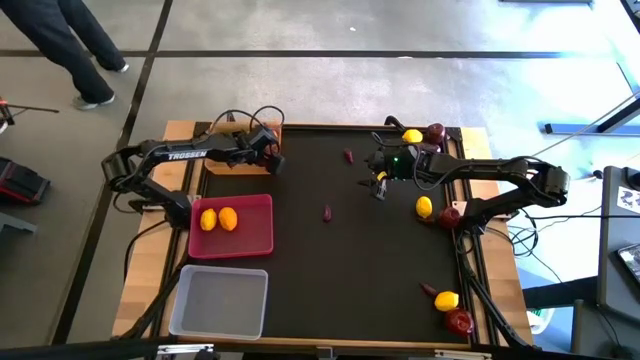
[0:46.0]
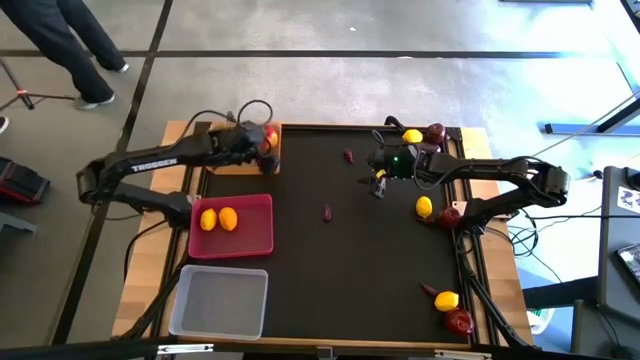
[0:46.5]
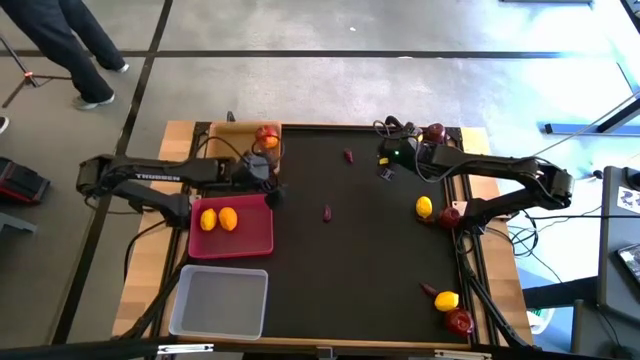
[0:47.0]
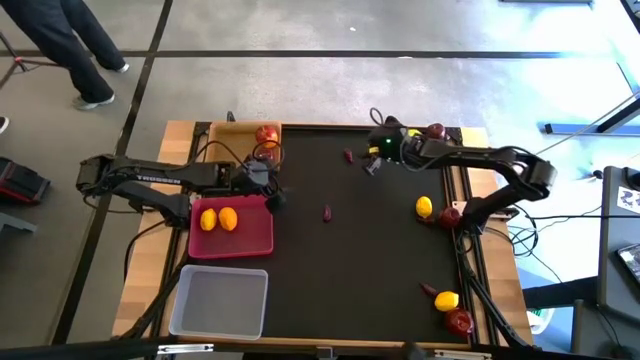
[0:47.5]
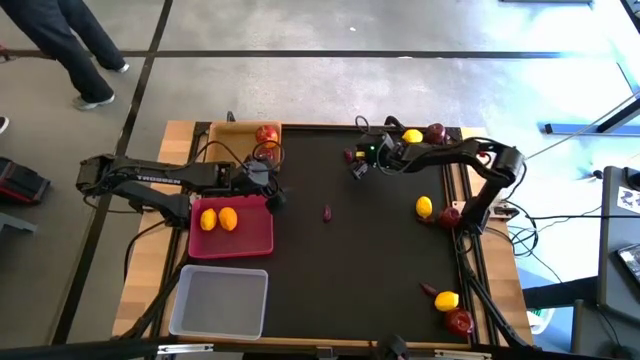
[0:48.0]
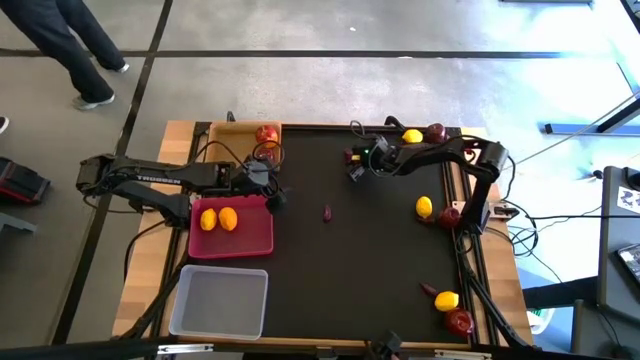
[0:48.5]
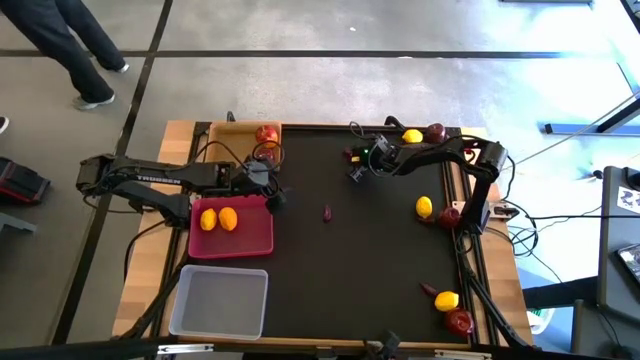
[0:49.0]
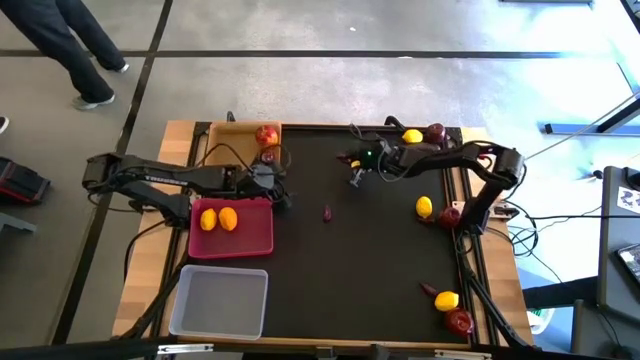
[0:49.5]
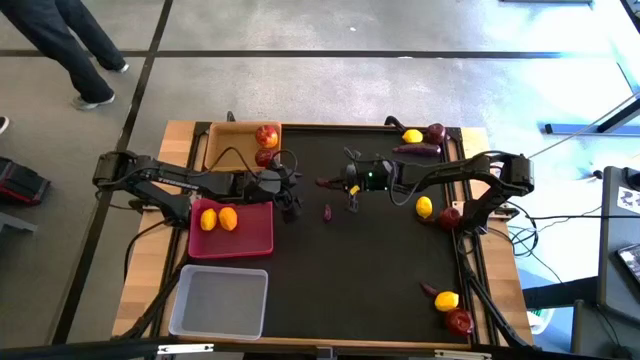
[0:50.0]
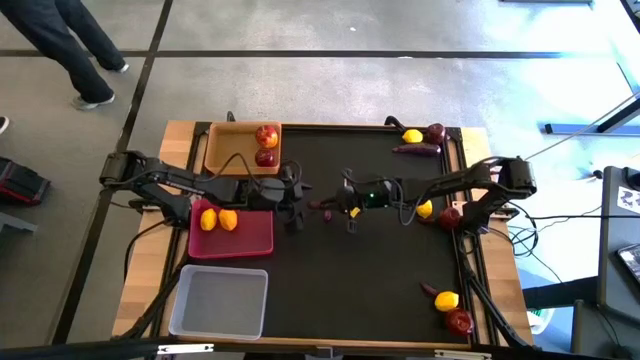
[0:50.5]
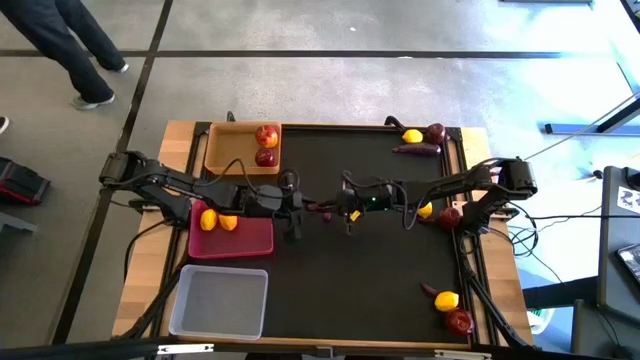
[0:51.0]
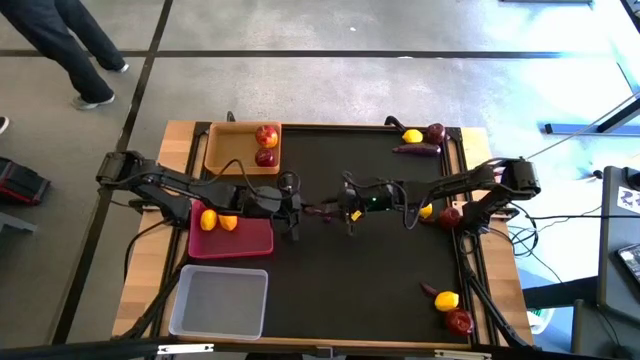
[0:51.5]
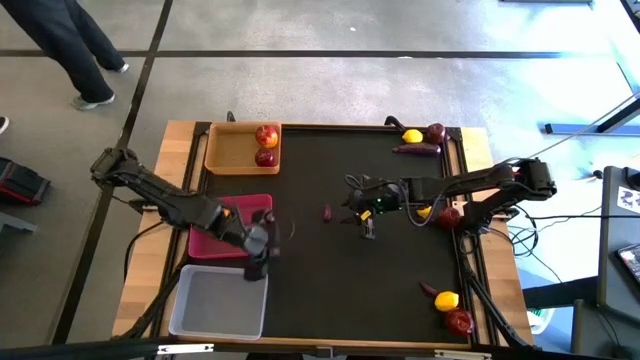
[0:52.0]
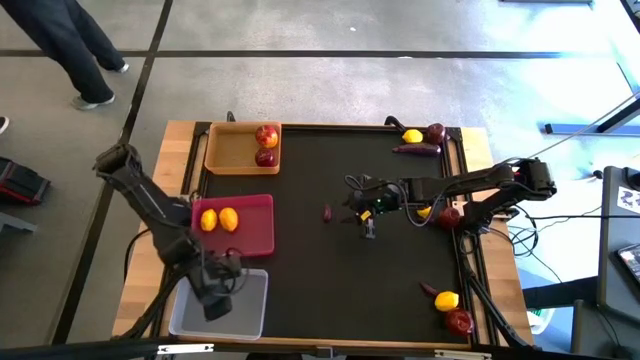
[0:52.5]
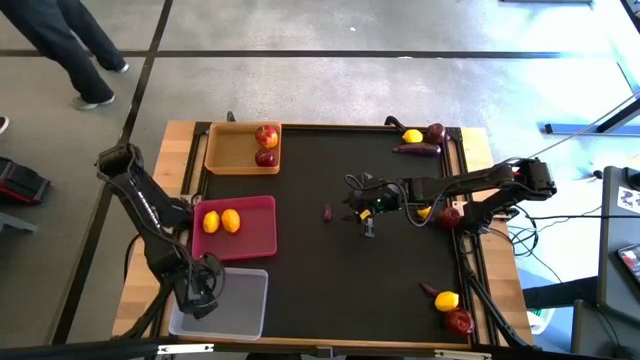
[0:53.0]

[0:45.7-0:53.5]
Task: Sort produce into baskets
Put the top left eggplant into the transparent bin

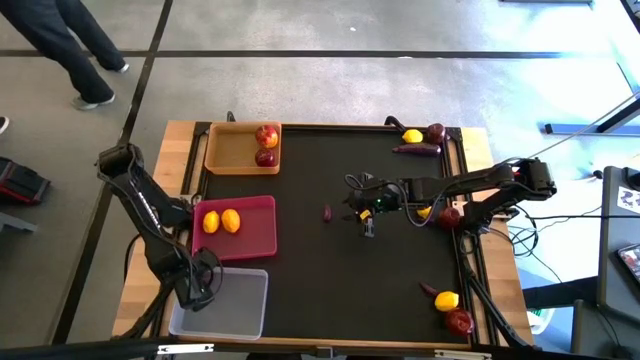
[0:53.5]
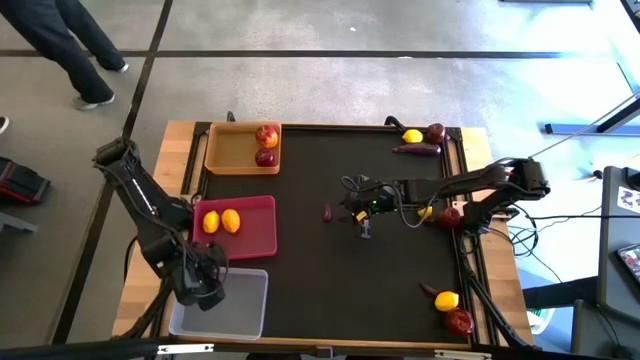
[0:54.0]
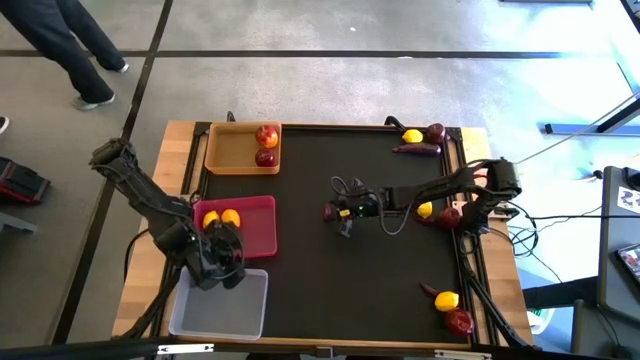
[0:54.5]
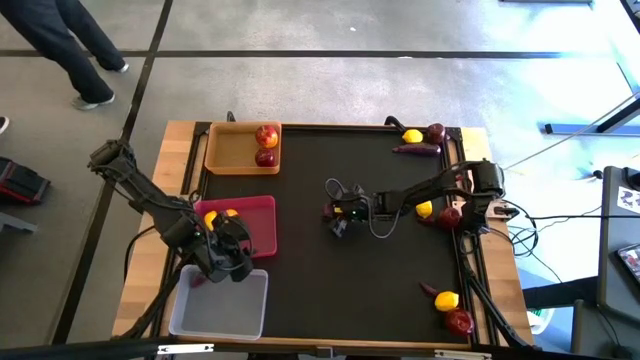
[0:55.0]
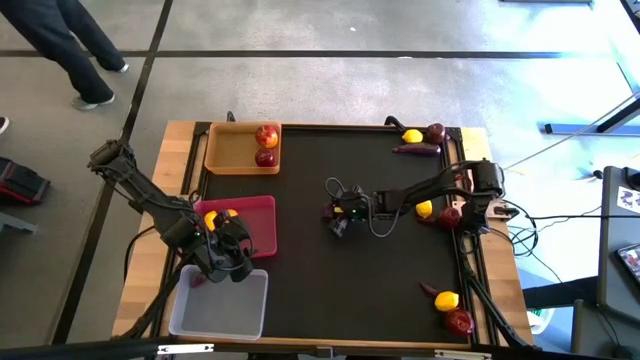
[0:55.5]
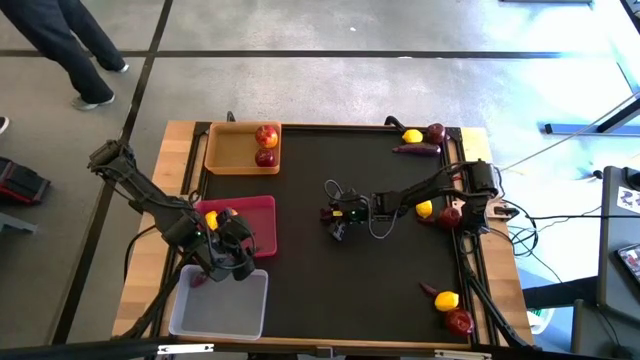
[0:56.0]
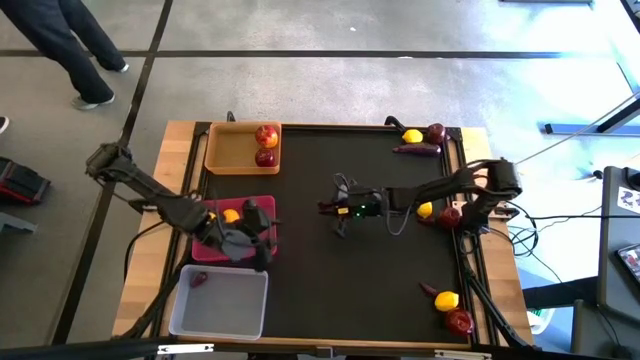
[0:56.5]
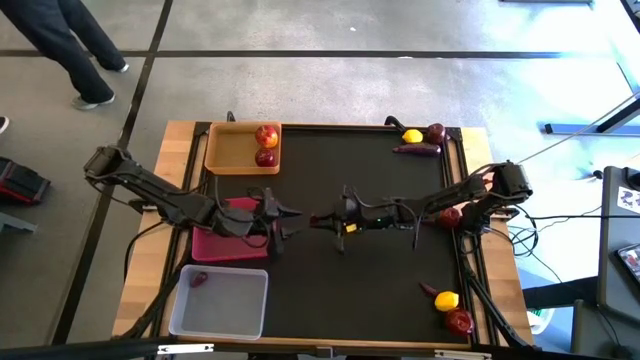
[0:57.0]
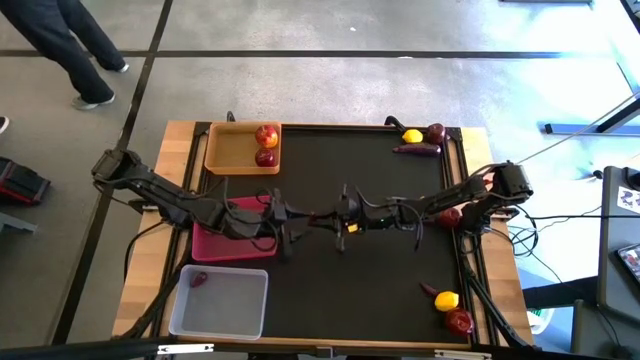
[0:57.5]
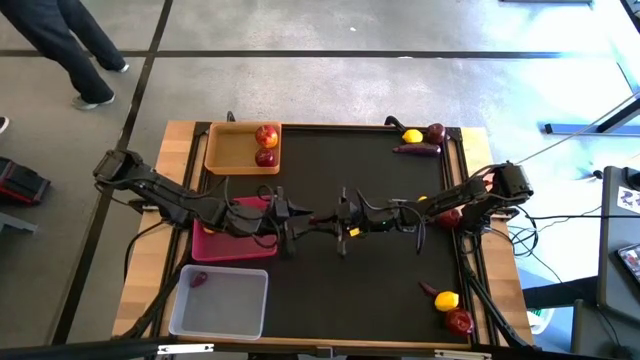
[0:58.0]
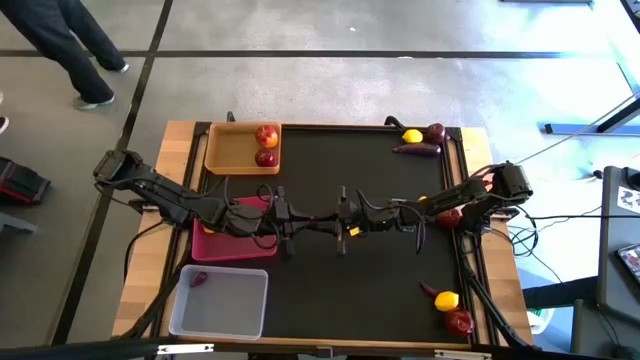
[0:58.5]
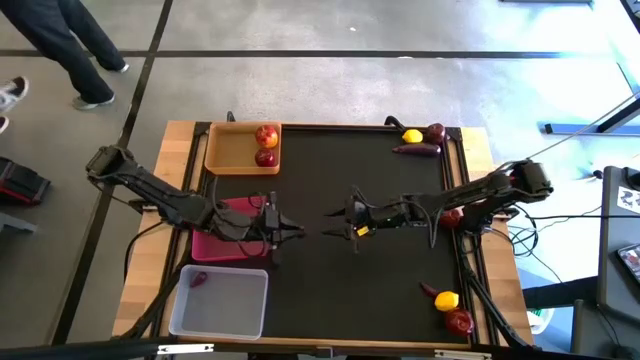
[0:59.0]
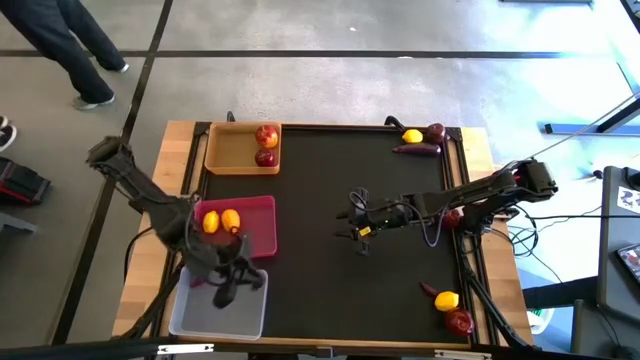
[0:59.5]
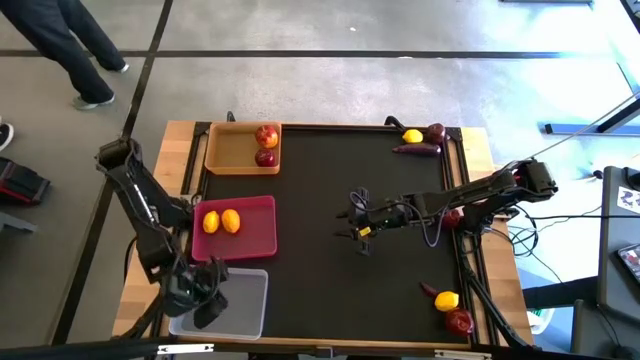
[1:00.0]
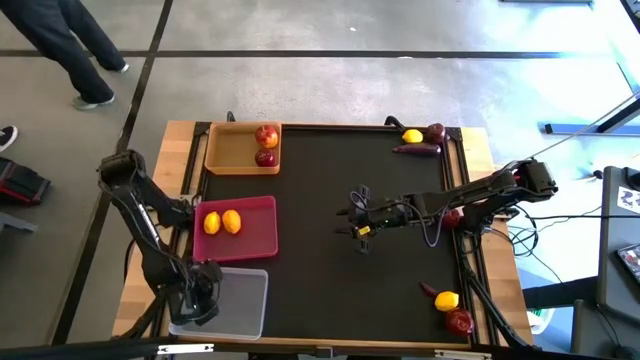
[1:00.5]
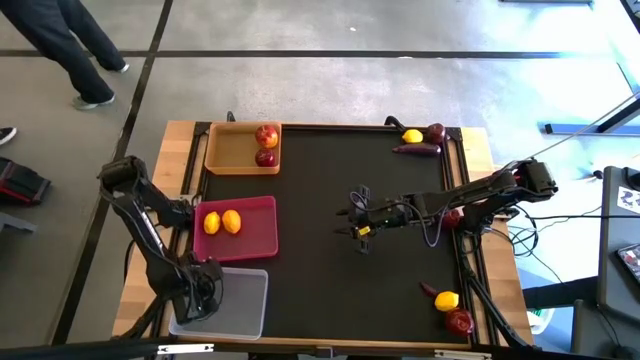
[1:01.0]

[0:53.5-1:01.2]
Put the middle left eggplant into the transparent bin

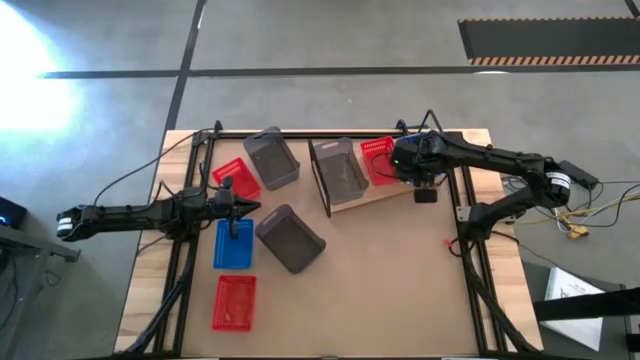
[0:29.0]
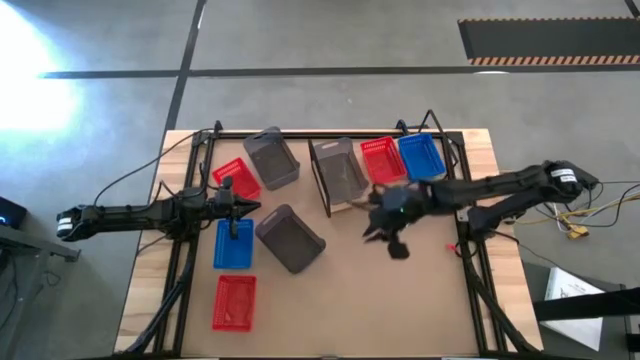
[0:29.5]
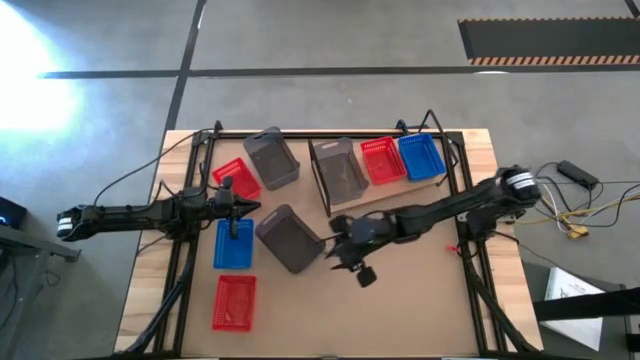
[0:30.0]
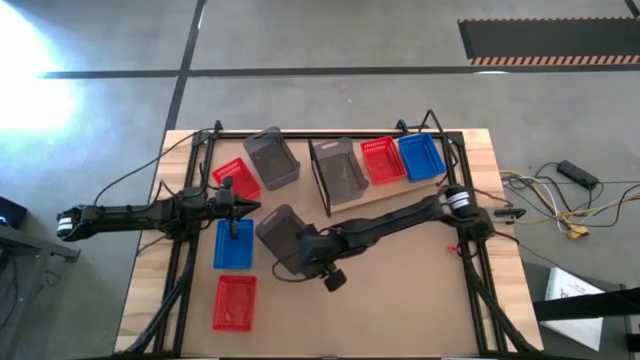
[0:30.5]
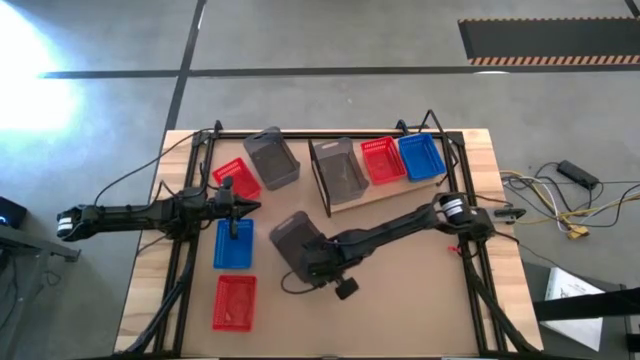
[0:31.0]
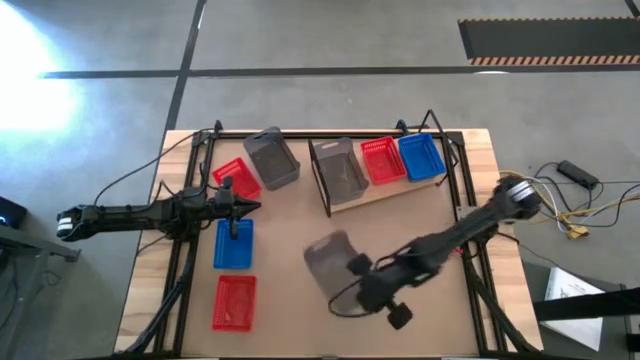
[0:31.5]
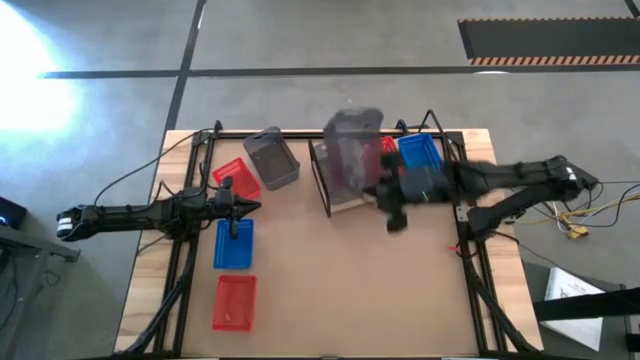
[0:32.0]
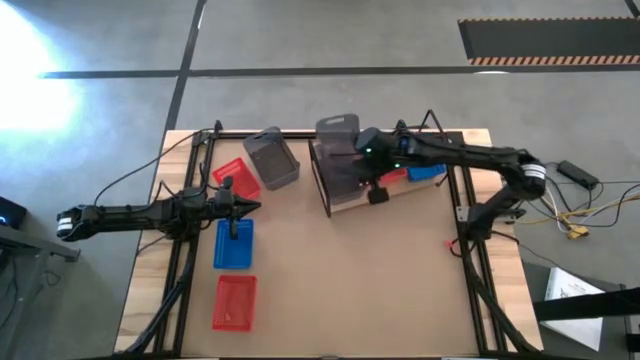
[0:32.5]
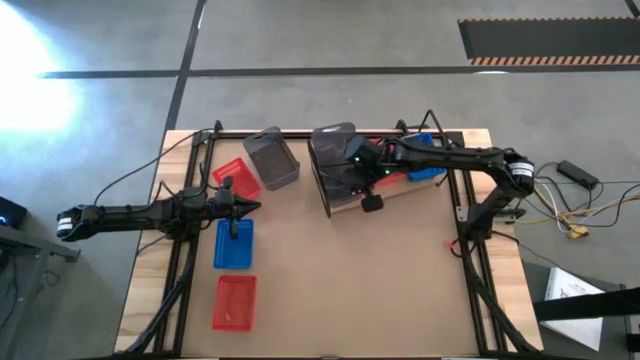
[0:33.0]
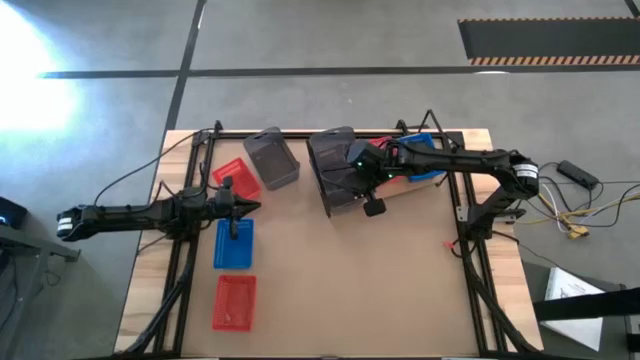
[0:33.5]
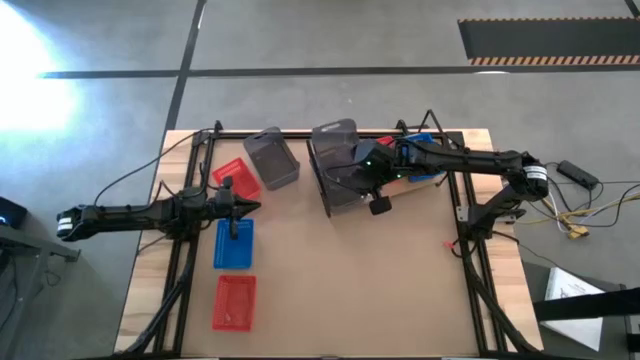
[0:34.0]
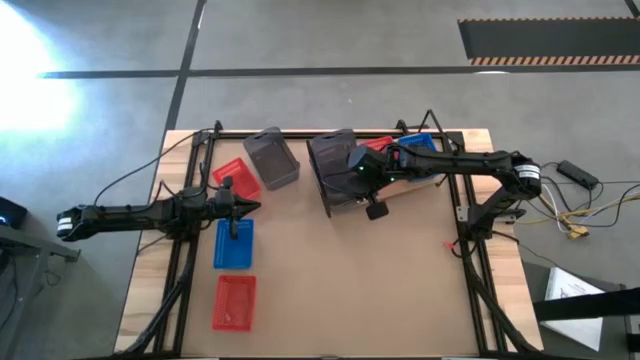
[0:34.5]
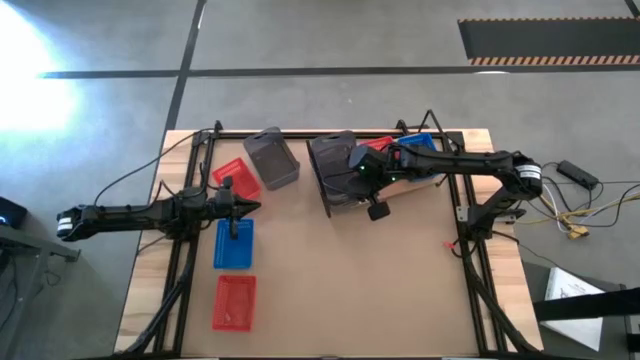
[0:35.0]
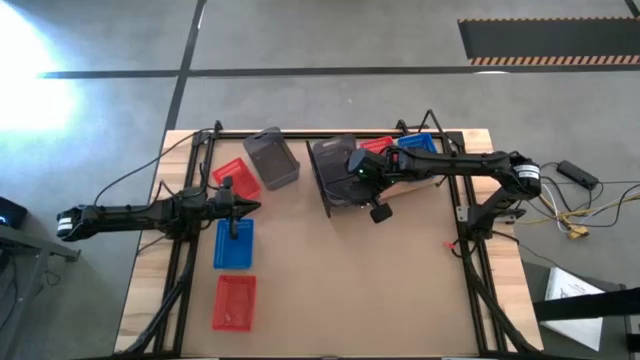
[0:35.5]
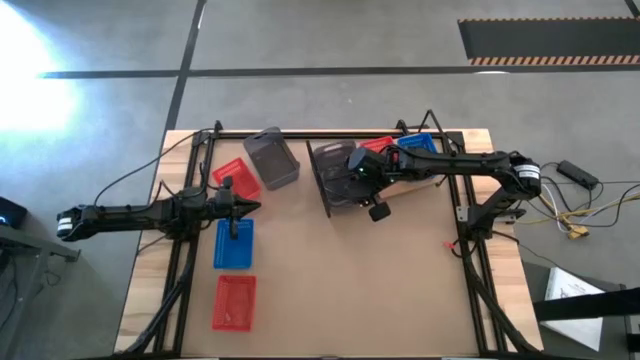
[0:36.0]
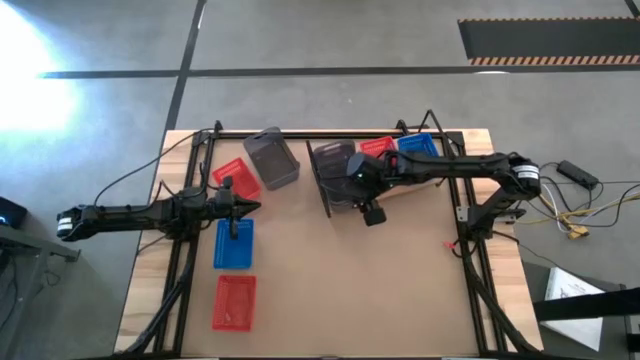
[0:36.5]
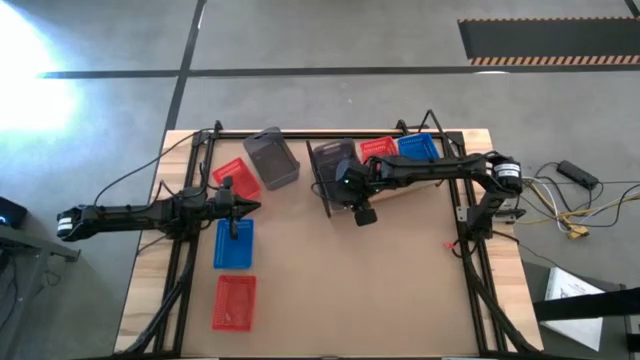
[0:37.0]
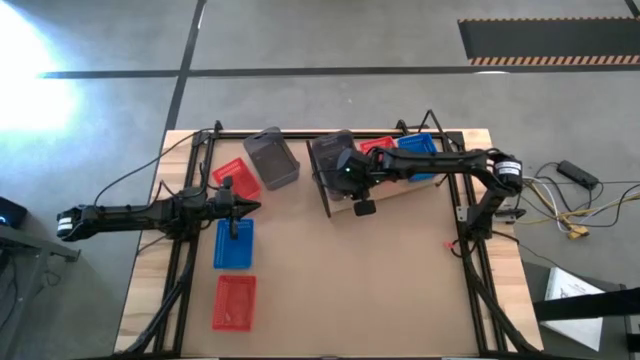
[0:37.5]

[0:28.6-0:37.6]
Task: Stack baskets on shelf by color
Stack the bottom black bin on the other black bin on the shelf
